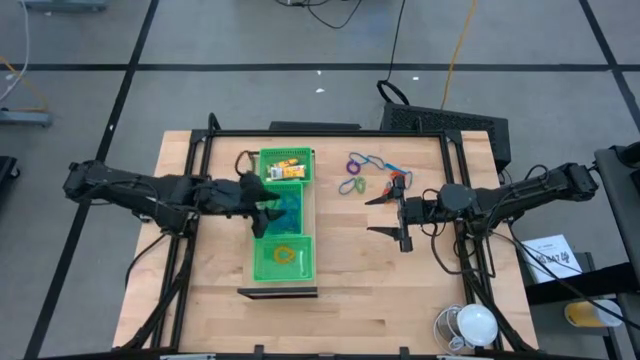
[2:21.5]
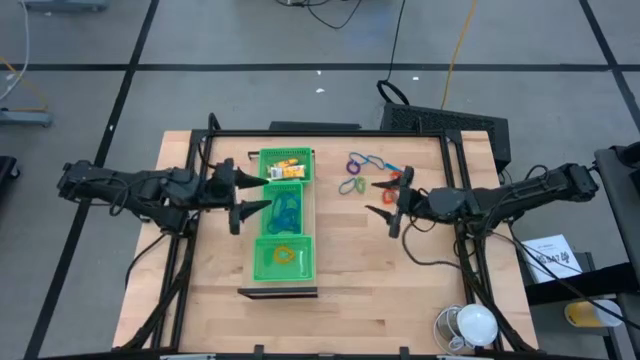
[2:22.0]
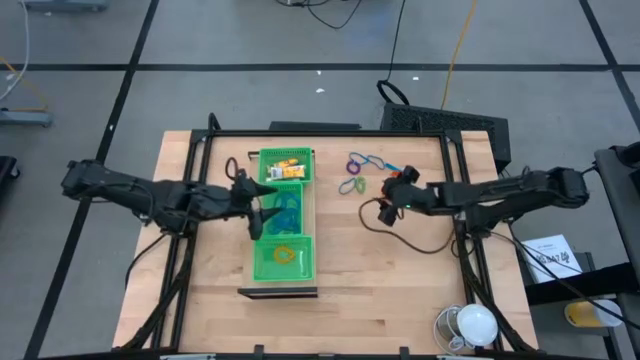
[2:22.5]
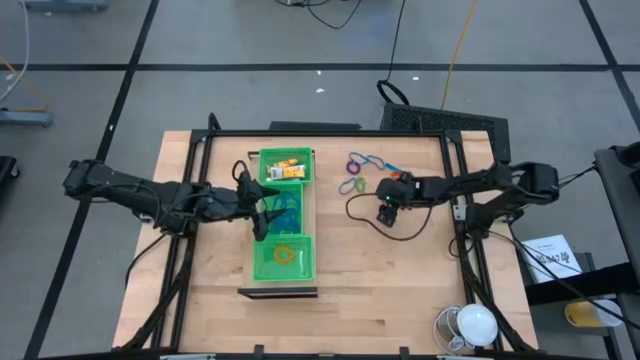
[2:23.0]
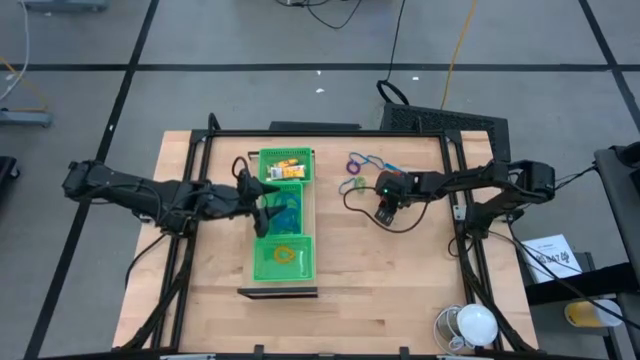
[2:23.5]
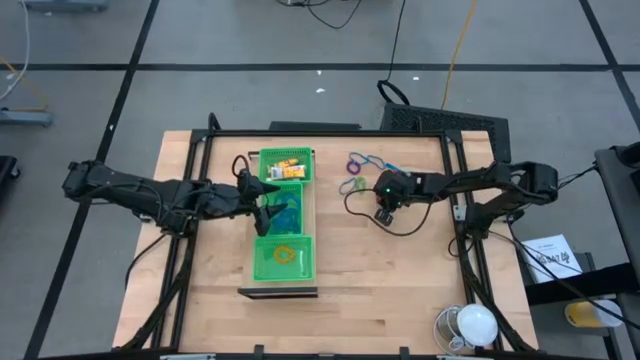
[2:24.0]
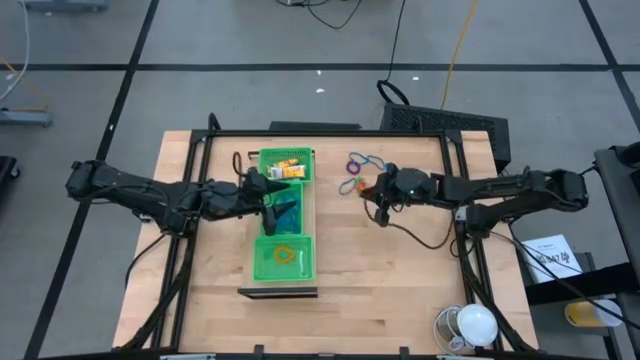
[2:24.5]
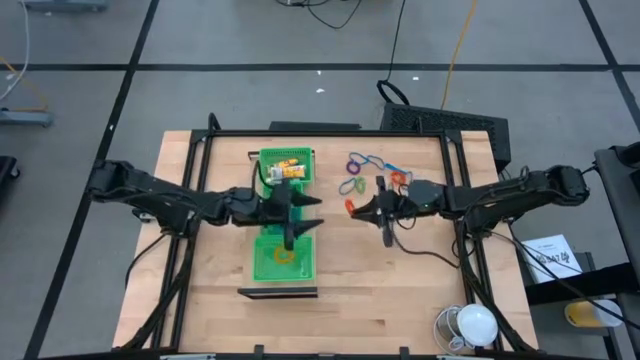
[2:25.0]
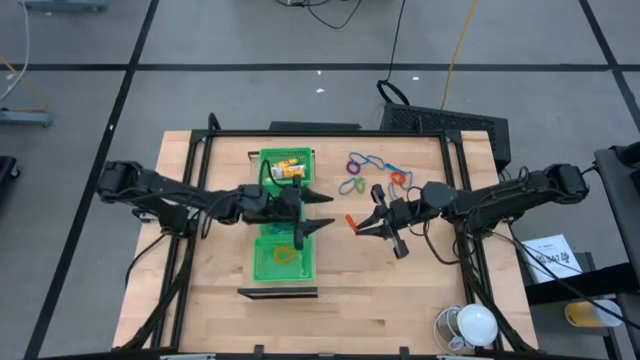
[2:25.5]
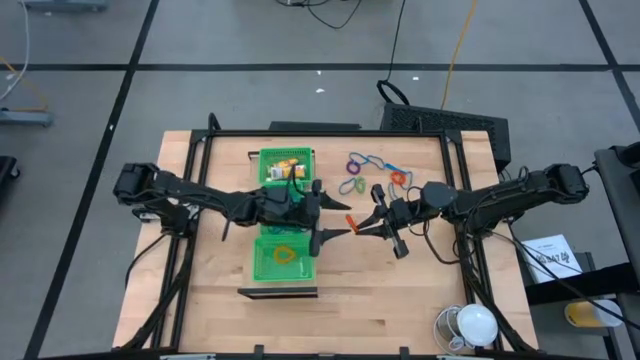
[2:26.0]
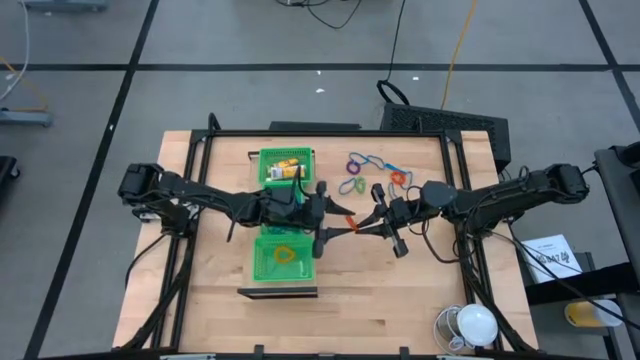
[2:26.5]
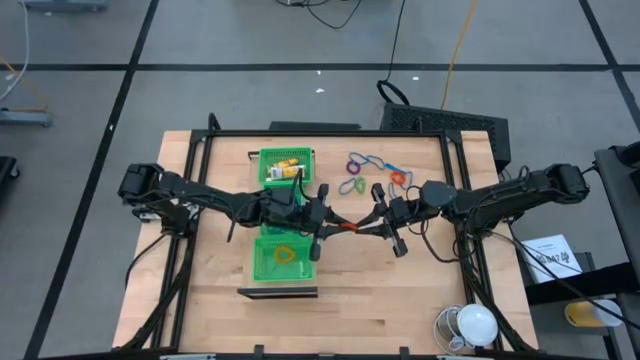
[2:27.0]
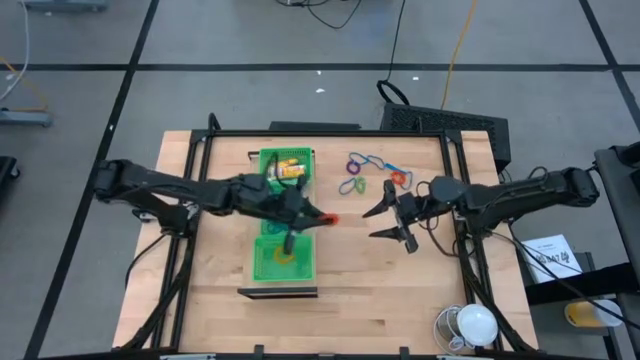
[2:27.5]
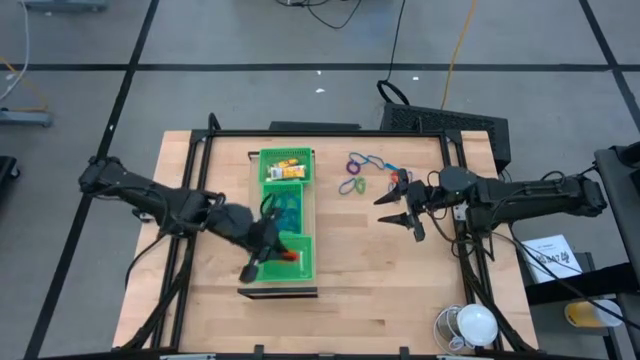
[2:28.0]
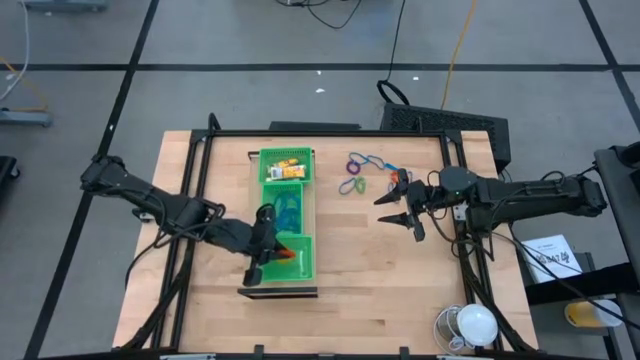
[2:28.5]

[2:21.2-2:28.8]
Task: Pick & Place Office Desk Supplies
Put the orange spring rubber band into the bottom green bin on the shelf

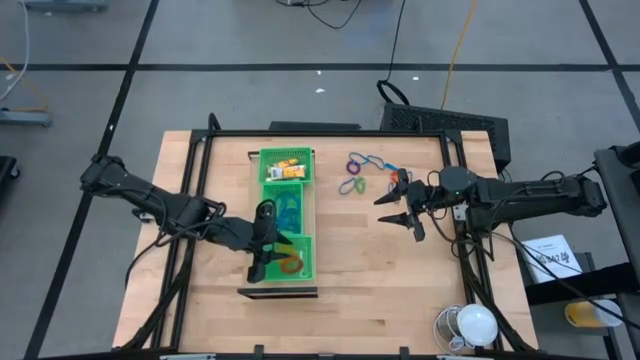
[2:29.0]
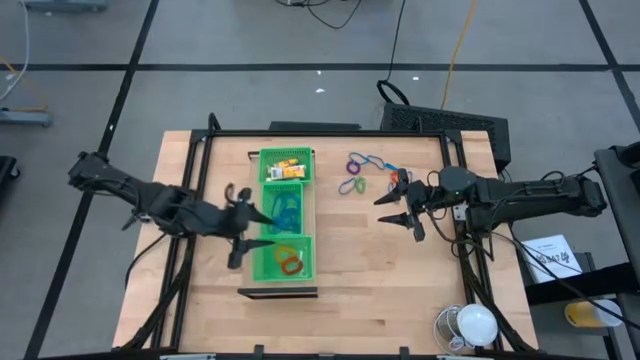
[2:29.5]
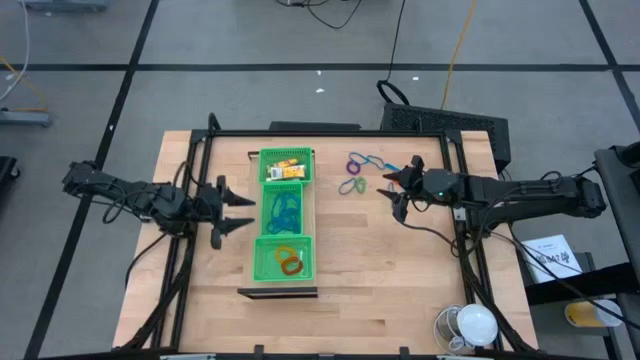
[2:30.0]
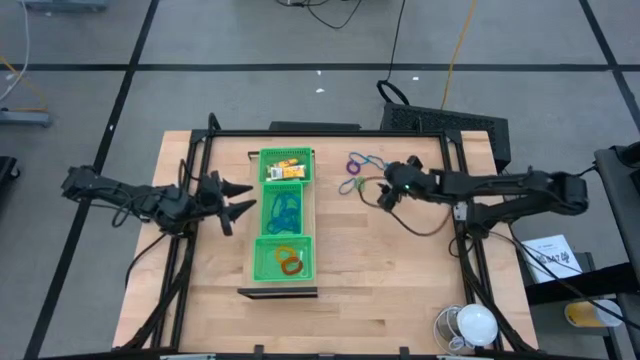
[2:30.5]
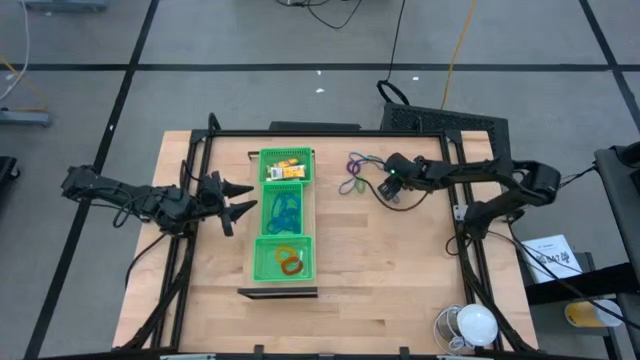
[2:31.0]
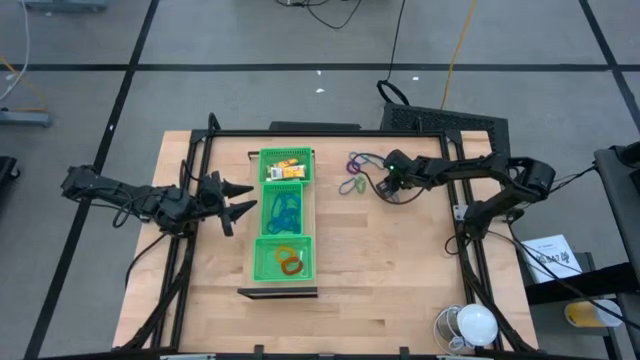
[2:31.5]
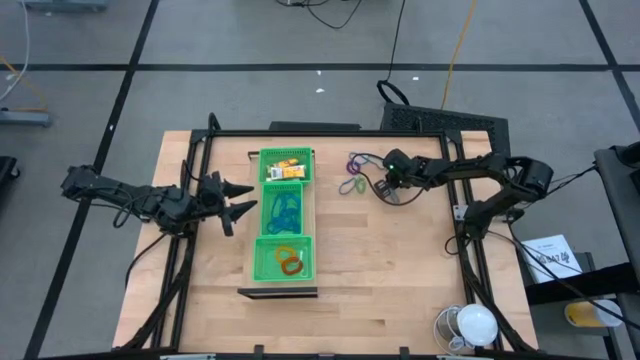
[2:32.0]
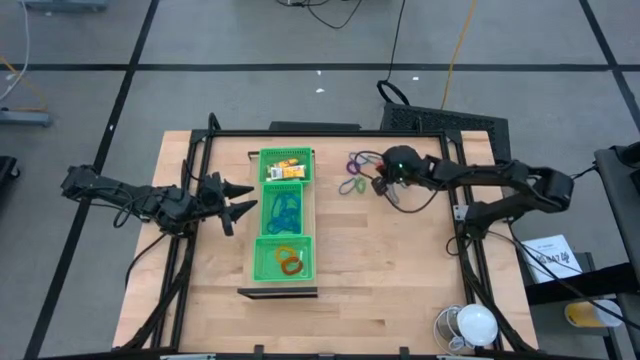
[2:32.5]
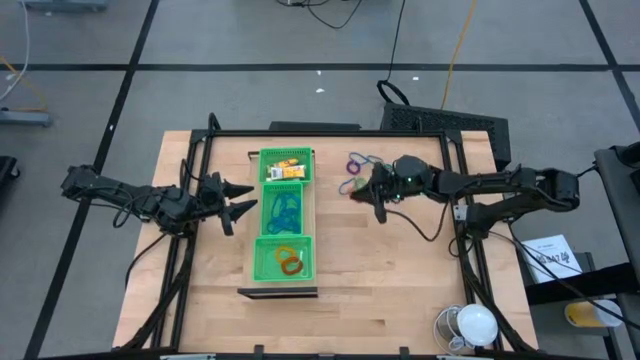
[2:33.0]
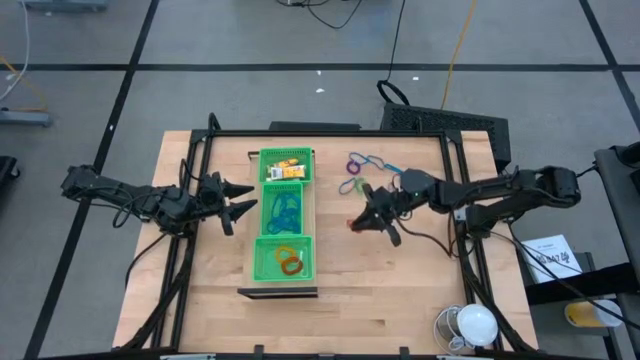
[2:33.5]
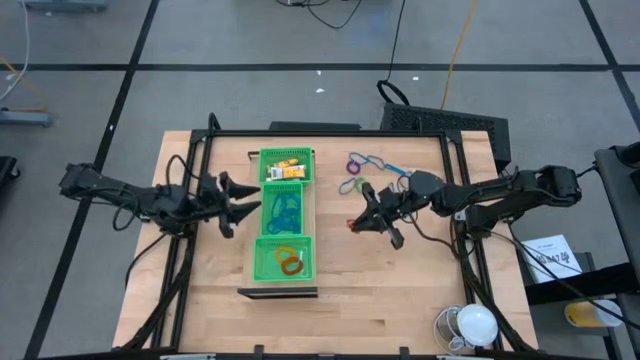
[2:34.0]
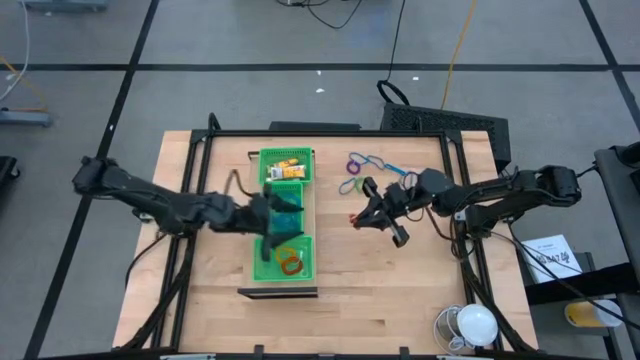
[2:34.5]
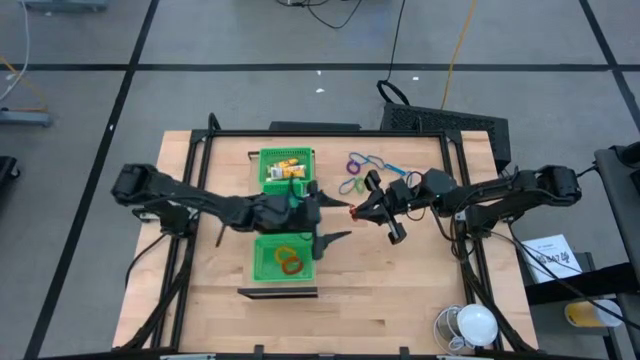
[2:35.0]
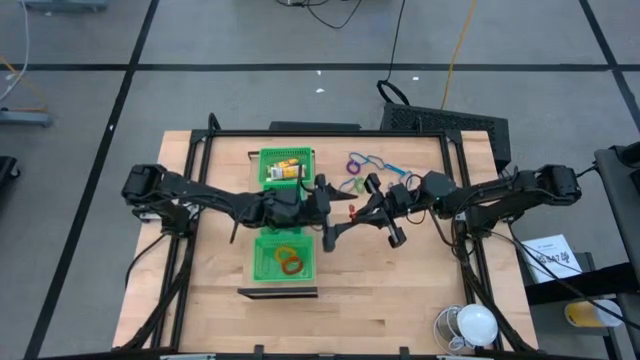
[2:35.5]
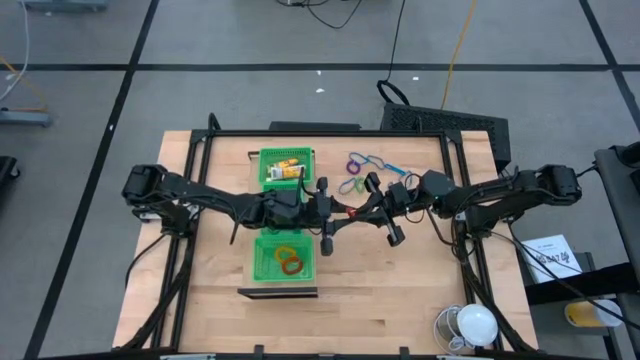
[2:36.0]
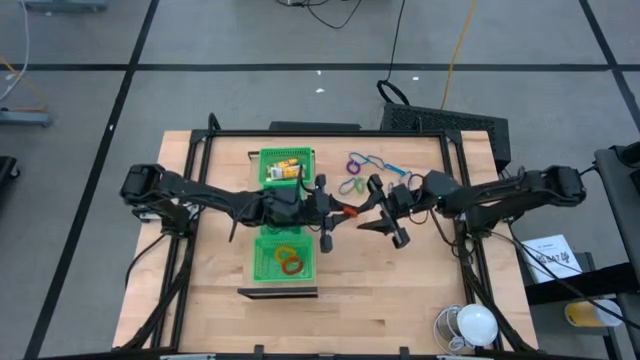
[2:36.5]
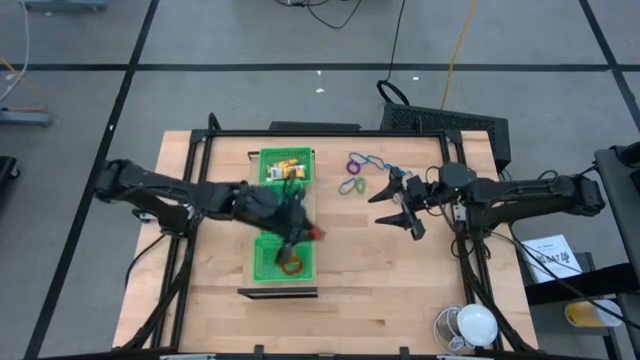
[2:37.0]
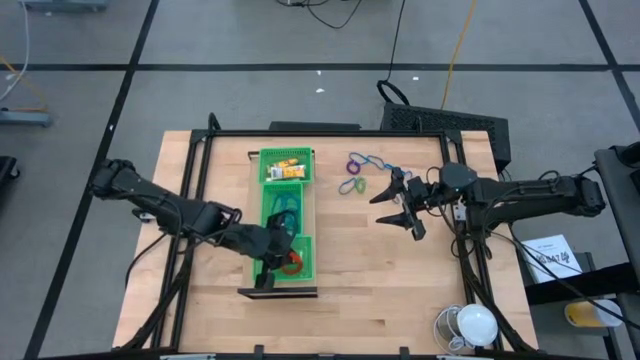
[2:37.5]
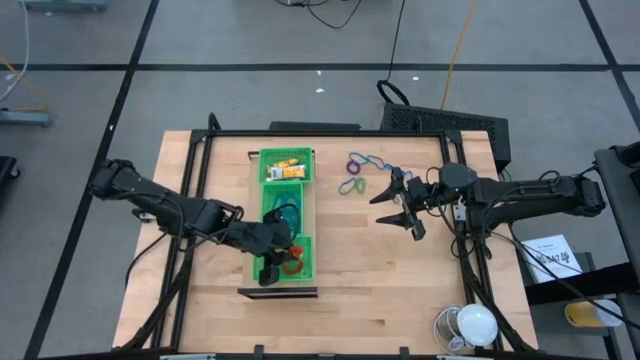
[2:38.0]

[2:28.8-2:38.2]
Put the orange spring rubber band into the bottom green bin on the shelf

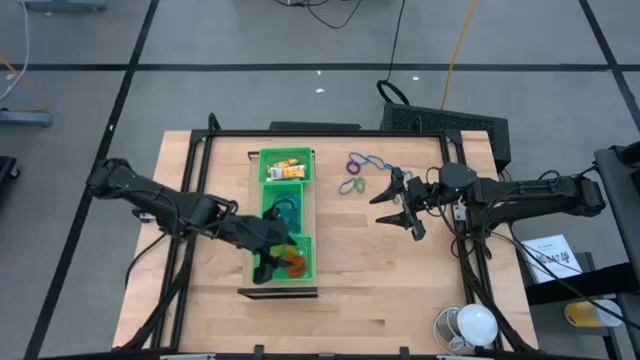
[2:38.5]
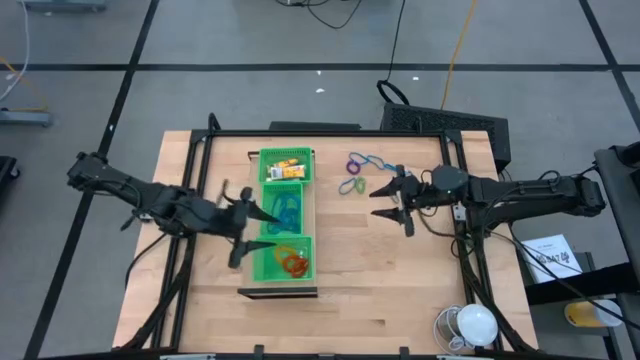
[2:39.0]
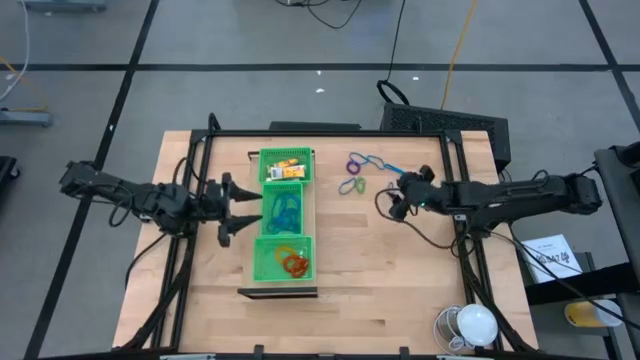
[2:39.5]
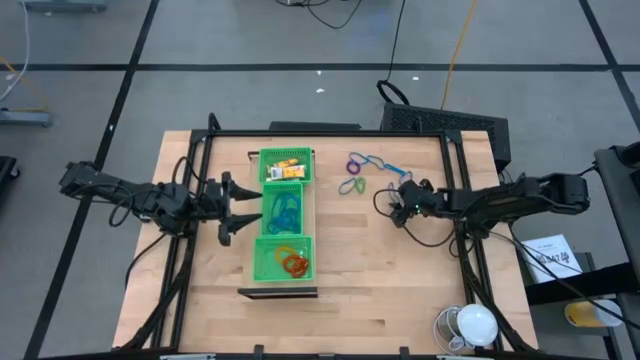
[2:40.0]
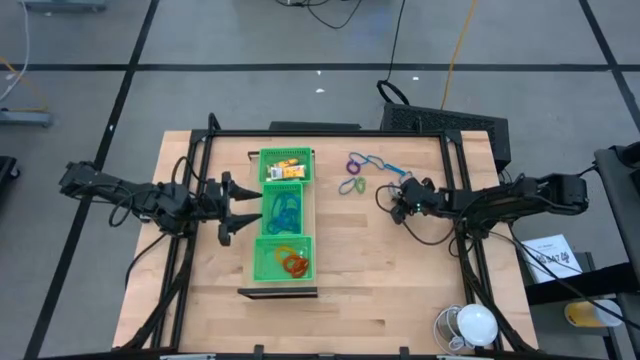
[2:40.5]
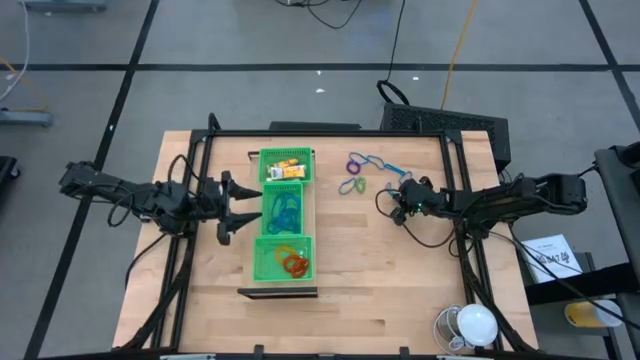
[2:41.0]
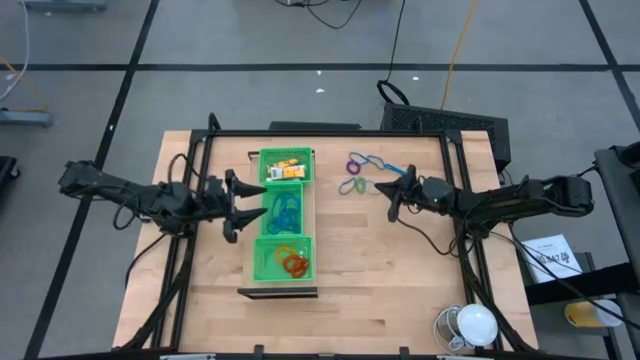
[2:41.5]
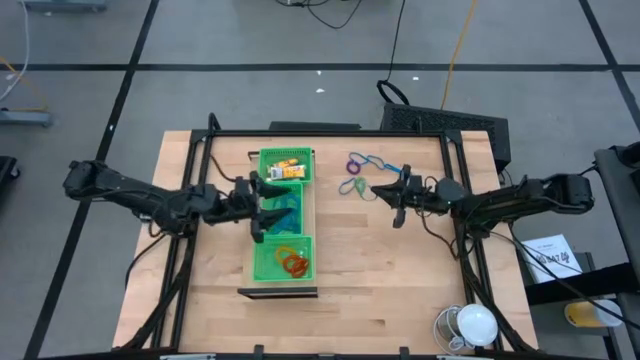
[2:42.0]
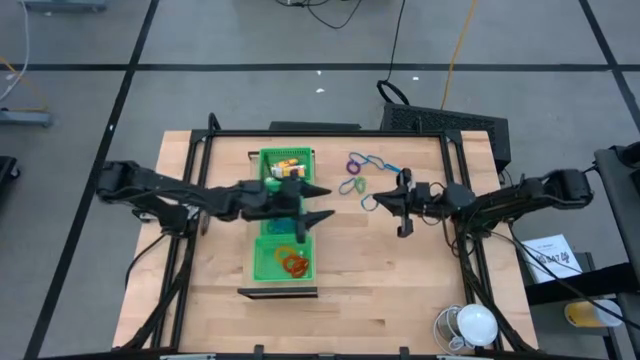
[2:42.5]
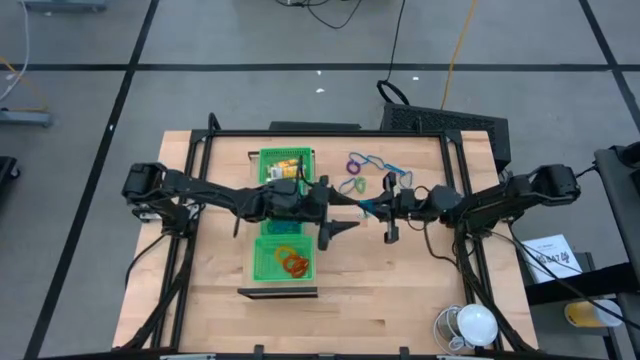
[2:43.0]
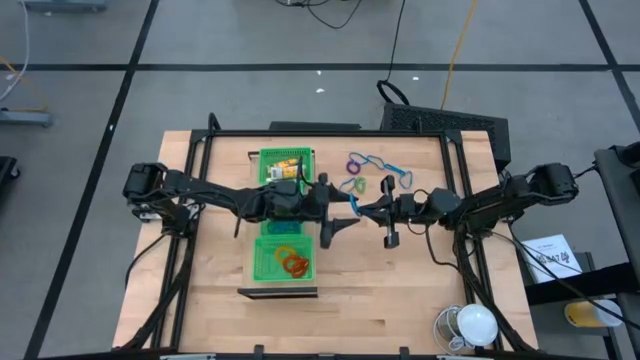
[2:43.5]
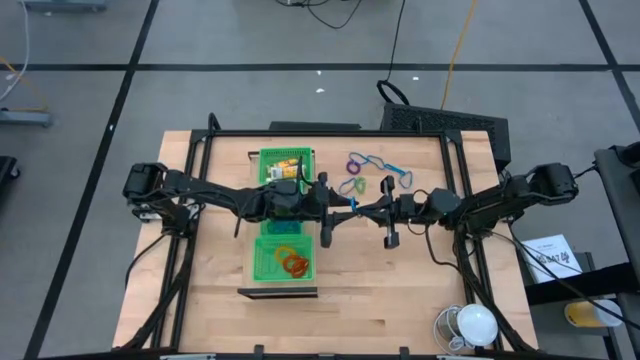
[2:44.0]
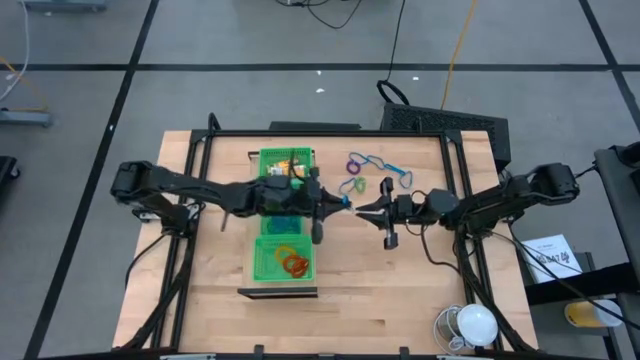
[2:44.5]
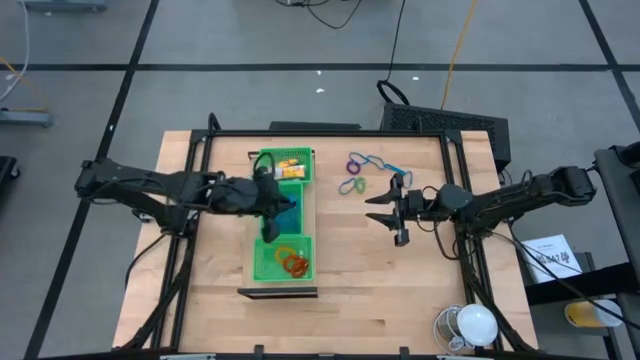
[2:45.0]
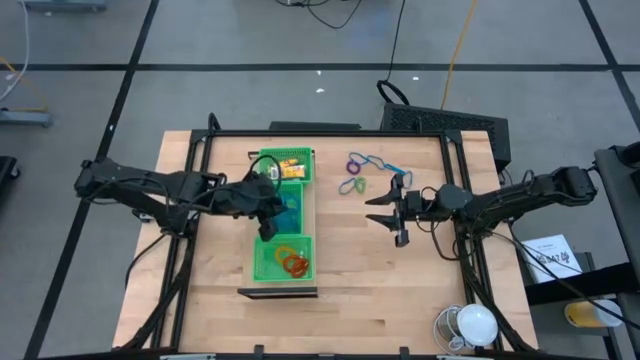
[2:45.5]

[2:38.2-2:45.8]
Put the blue rubber band into the center green bin on the shelf
